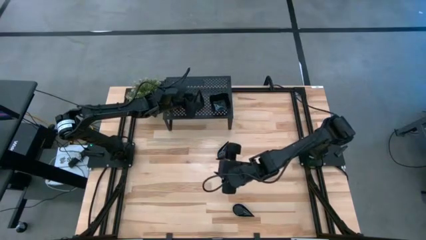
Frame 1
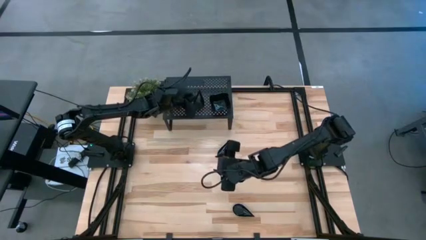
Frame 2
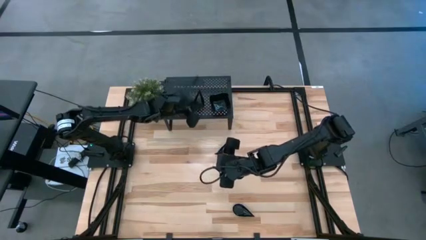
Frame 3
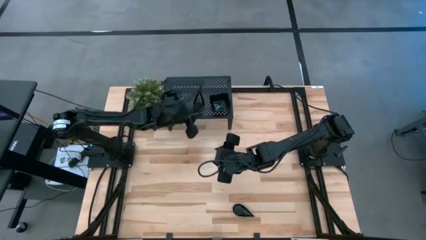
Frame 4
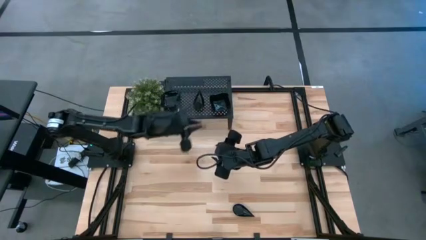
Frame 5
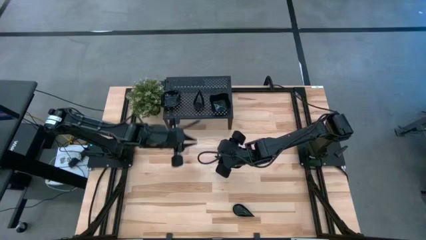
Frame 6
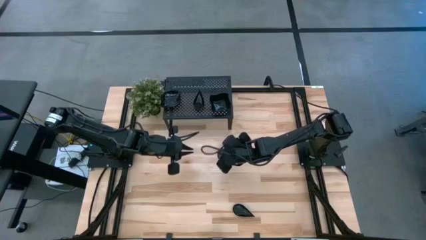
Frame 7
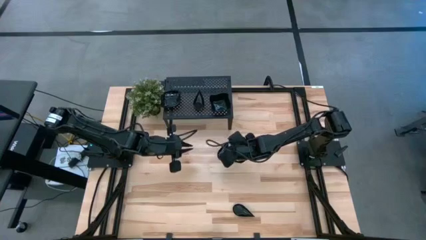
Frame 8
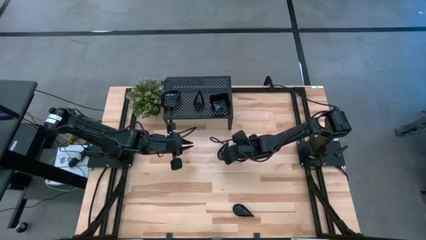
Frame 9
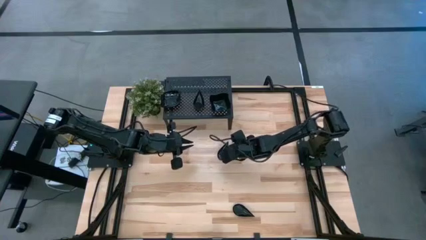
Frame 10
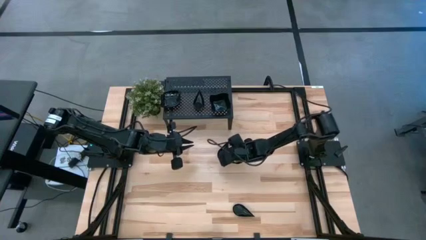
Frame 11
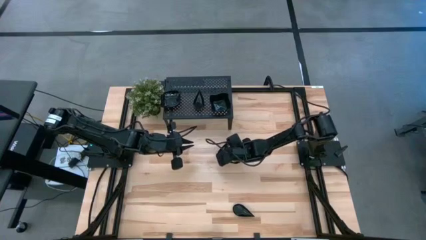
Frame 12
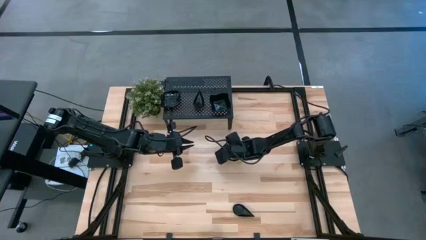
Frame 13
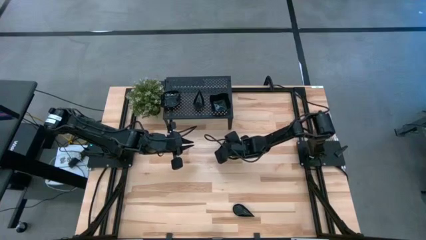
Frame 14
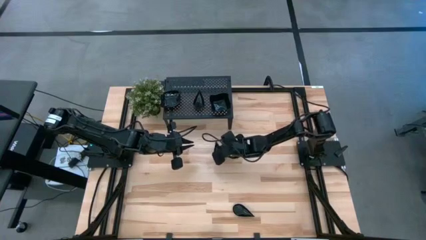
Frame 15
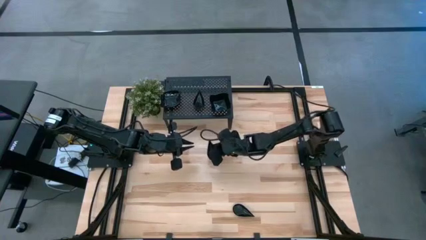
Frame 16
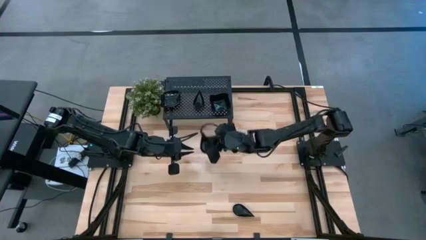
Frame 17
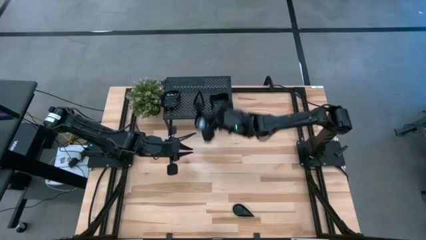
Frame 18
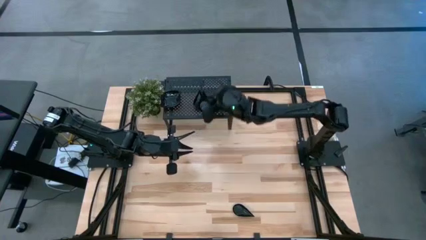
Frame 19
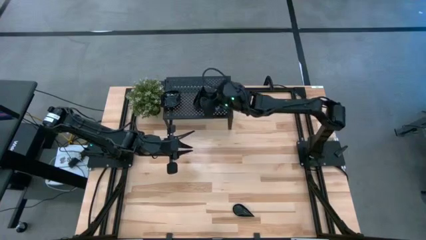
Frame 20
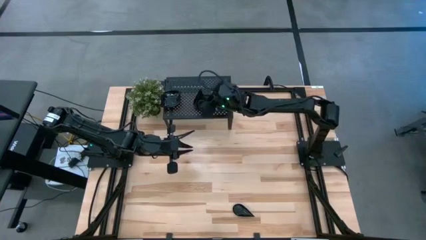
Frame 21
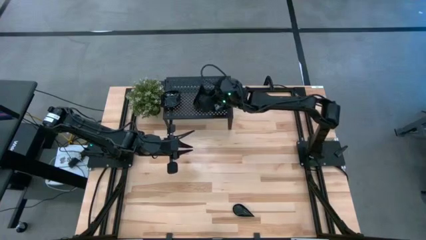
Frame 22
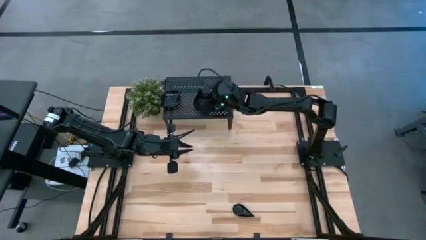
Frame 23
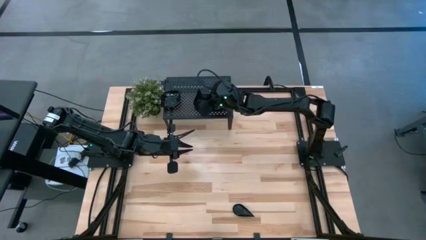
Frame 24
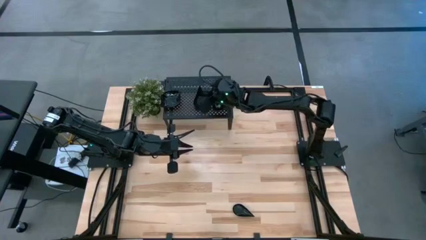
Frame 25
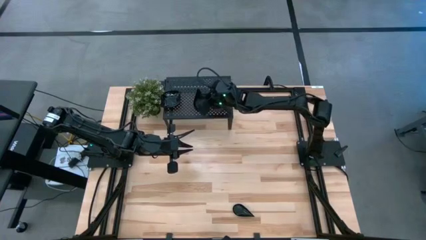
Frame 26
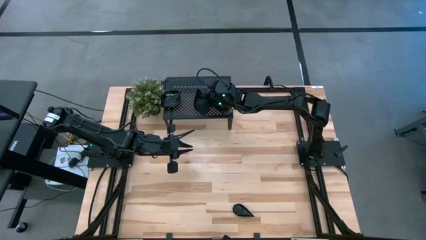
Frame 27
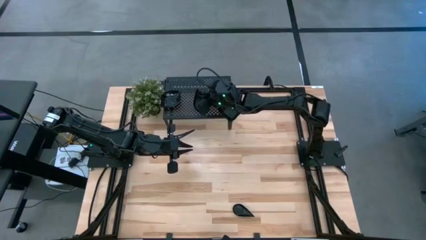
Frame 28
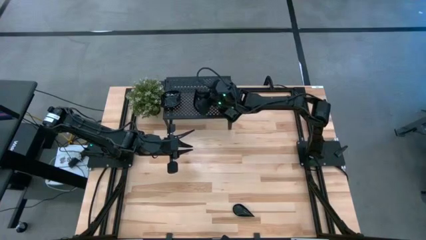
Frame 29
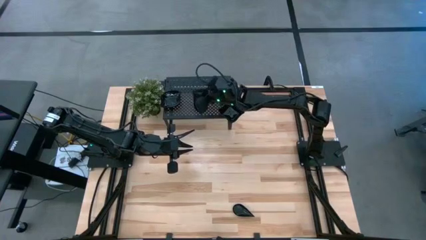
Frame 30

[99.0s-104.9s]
Task: Pick & Place Mini shaped plates
Stack the black drop-shaped plate on top of the black drop-shaped plate on the shelf

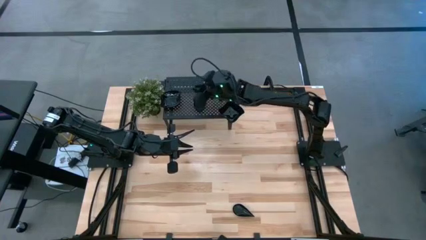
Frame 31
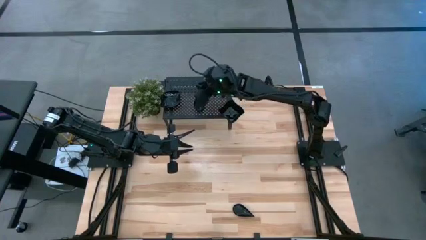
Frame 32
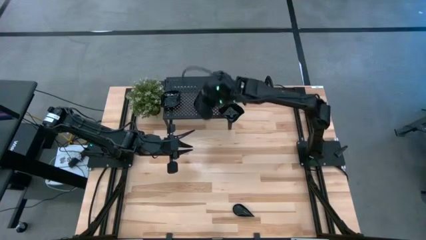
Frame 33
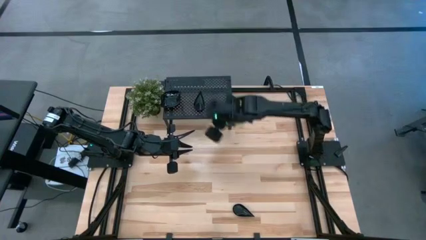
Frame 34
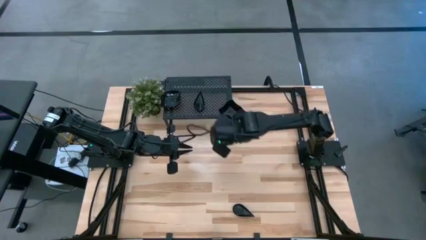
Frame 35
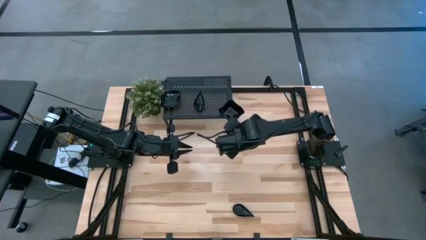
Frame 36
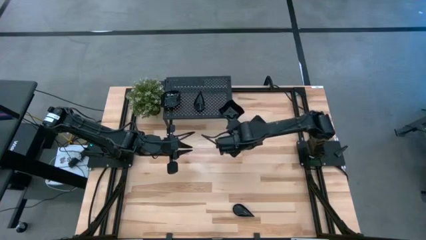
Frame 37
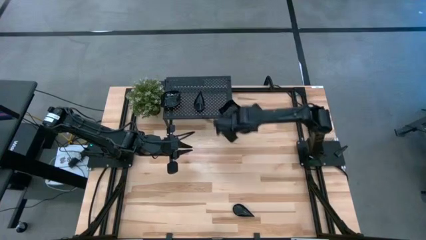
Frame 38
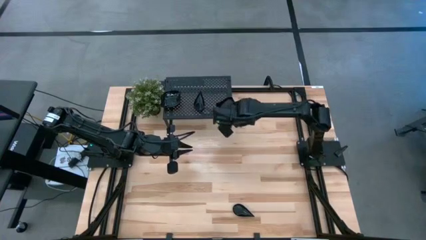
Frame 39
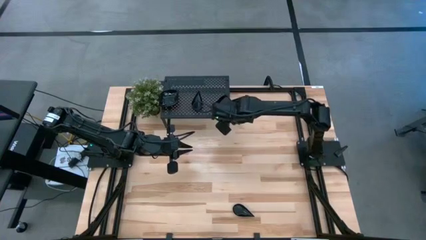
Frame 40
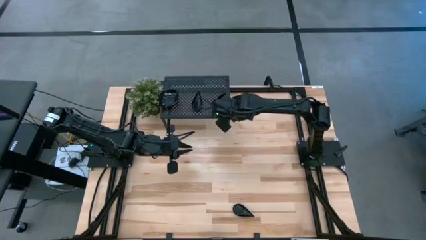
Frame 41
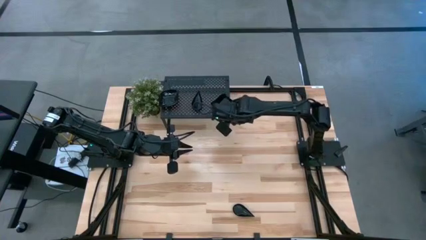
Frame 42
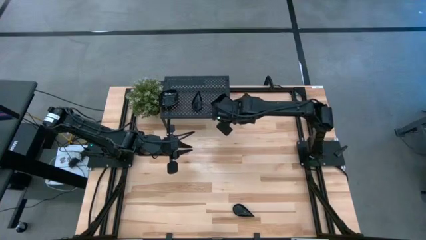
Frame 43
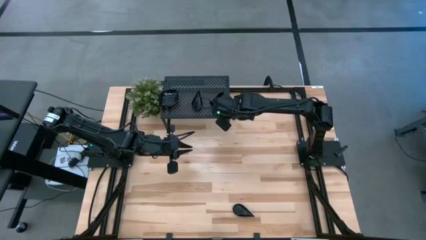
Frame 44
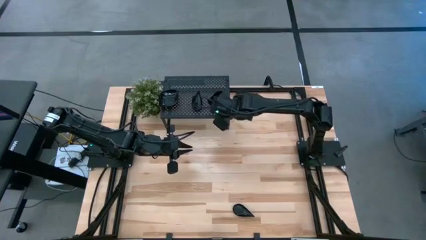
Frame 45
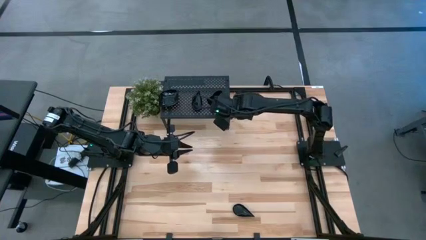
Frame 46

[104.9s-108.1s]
Adjust the black distorted square plates

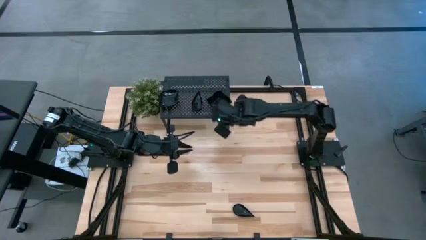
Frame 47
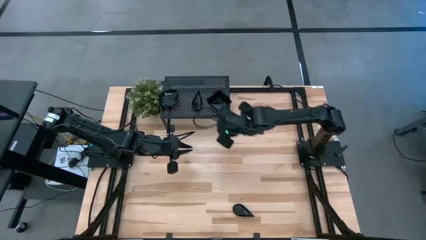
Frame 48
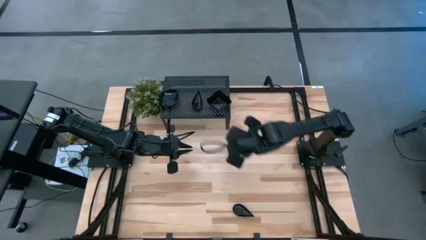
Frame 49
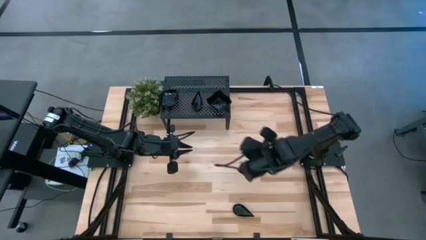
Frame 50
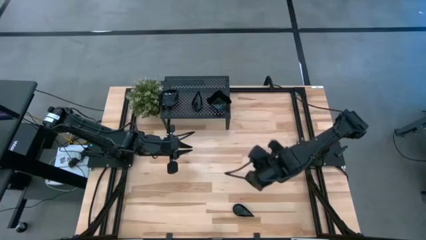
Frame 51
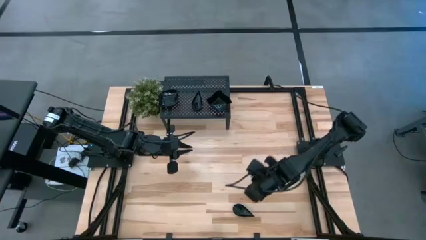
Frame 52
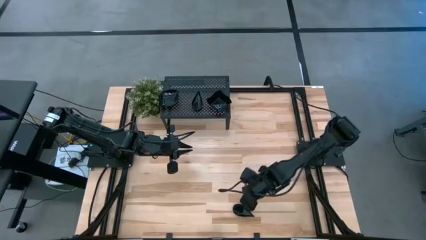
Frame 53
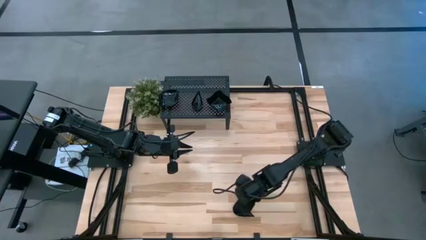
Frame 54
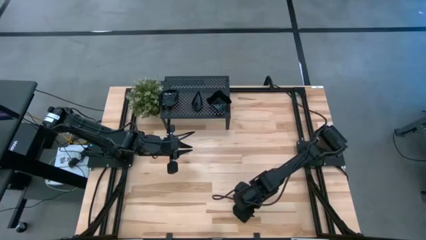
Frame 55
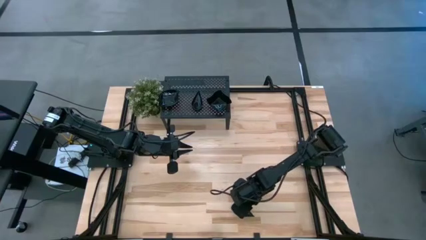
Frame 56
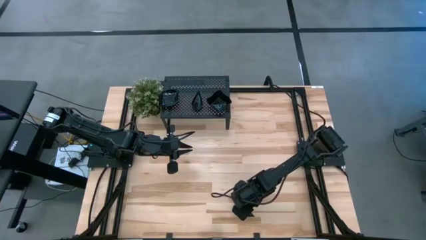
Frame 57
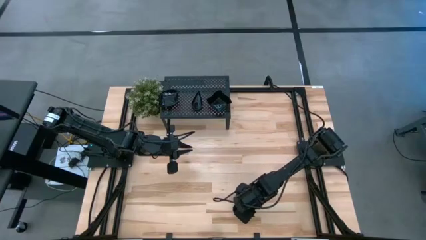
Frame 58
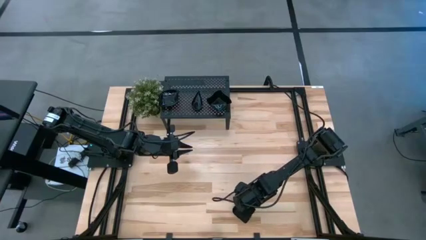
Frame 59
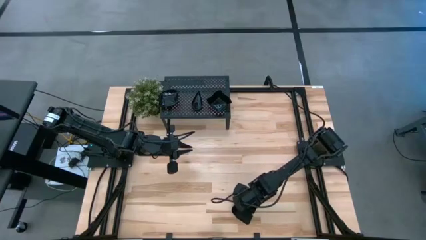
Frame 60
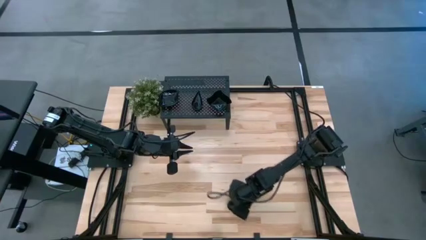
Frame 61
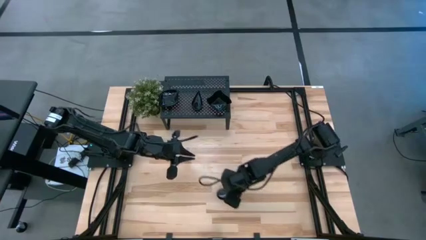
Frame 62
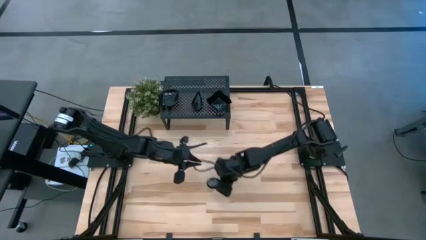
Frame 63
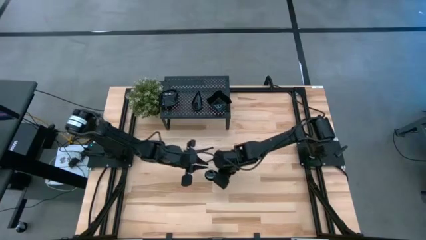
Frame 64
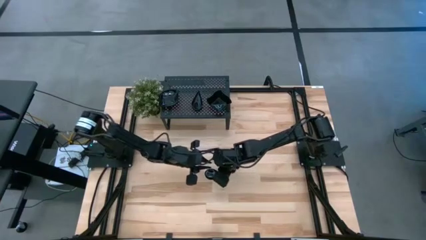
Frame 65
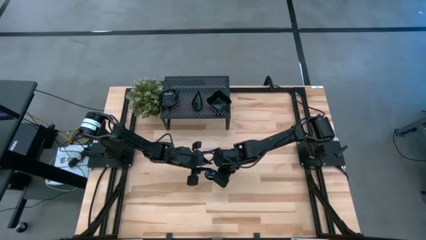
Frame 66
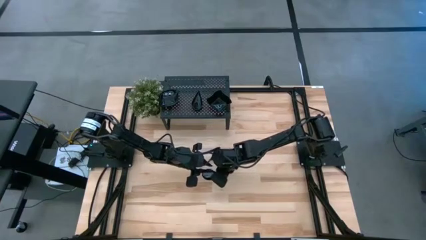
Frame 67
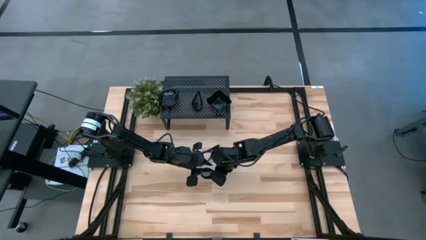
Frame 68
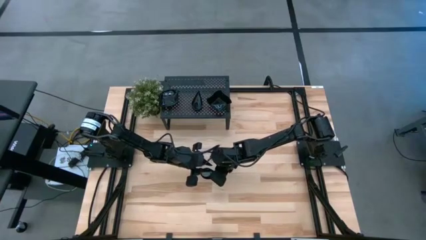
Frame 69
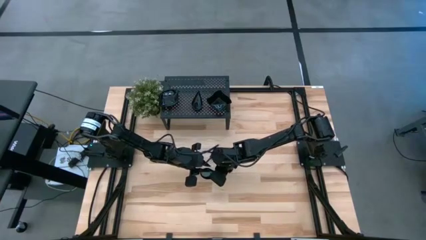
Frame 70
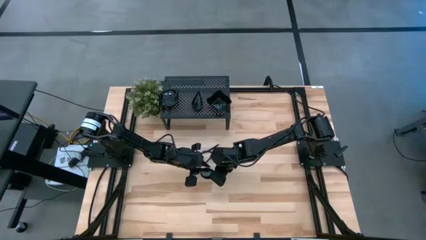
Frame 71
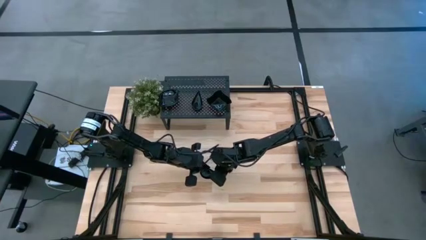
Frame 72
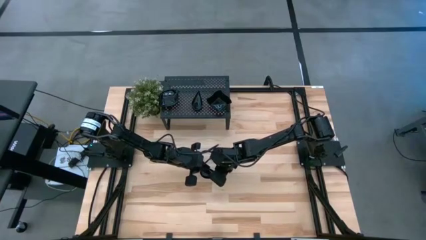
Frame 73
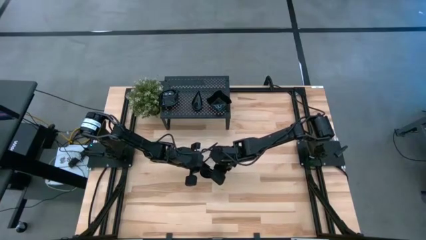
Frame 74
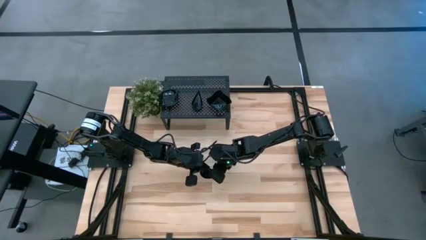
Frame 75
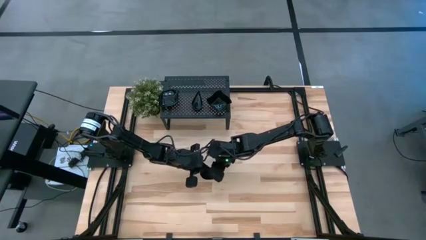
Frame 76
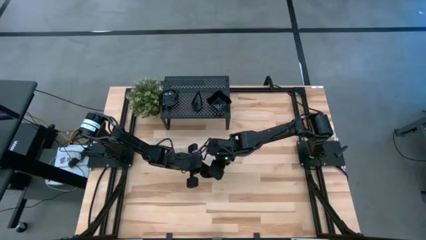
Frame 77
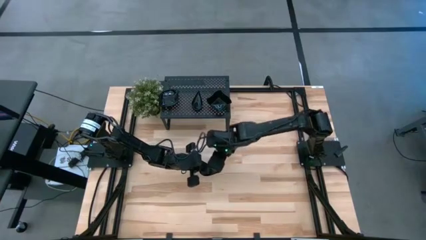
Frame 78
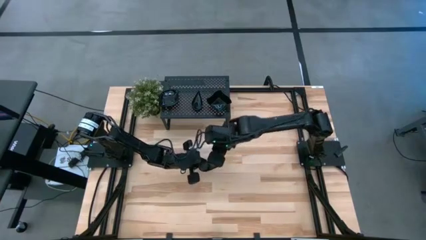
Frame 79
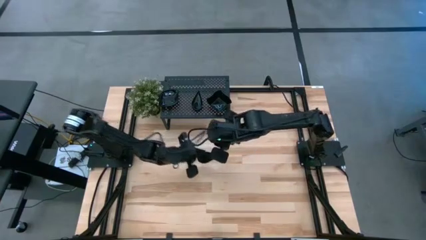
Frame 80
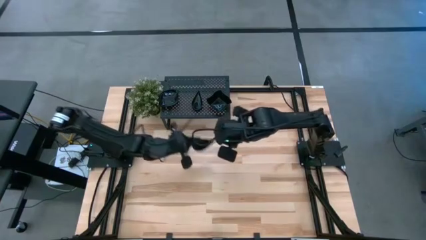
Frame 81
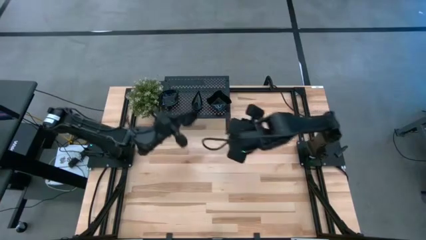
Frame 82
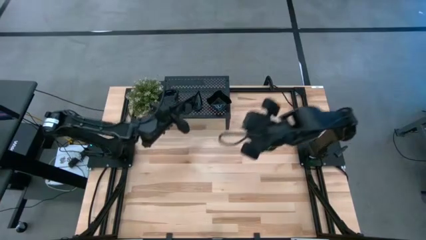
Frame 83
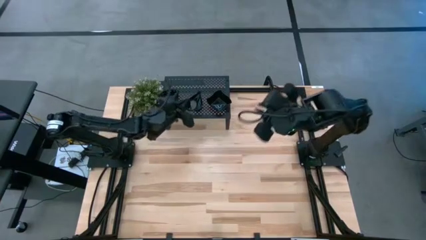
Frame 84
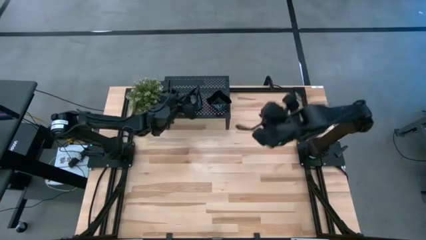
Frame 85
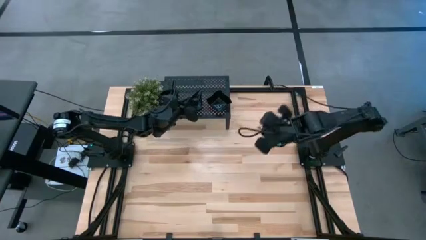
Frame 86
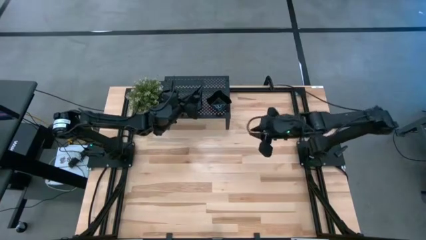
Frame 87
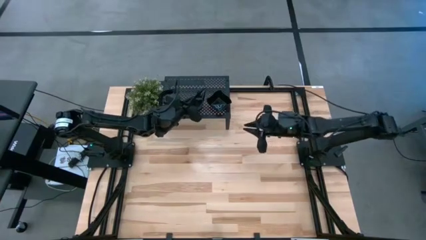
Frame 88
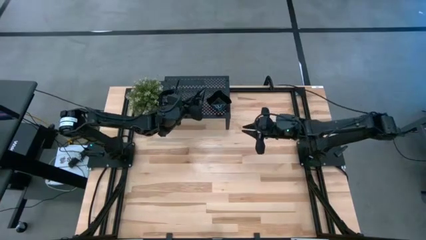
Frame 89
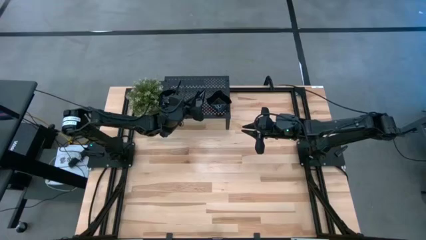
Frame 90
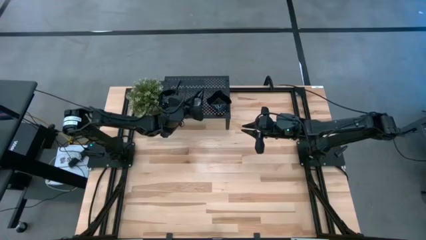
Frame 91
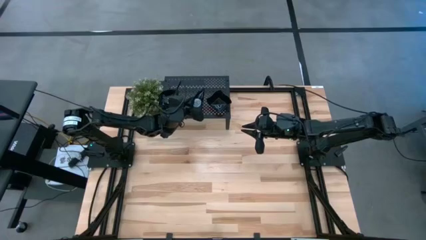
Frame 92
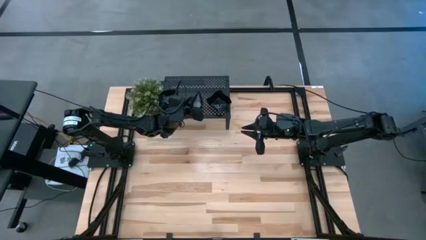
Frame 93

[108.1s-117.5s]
Stack the black drop-shaped plate on top of the black drop-shaped plate on the shelf
